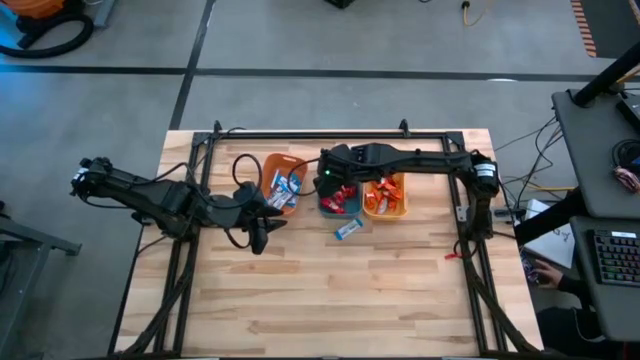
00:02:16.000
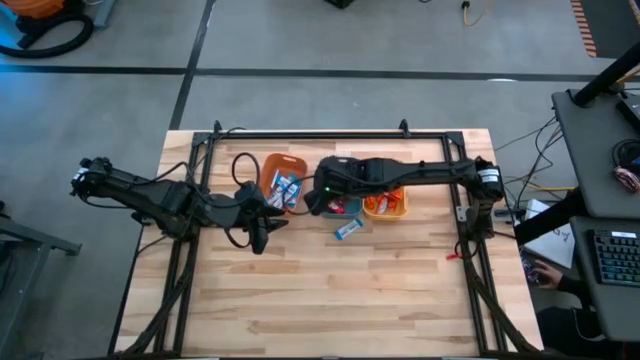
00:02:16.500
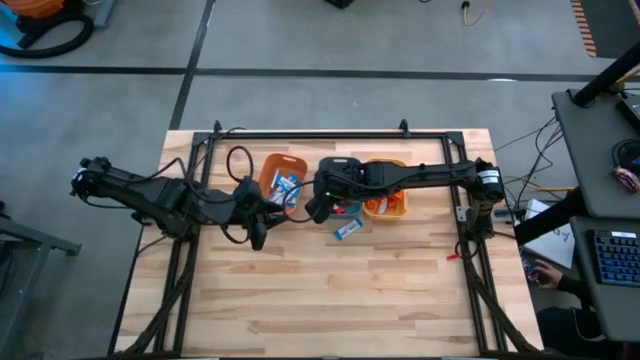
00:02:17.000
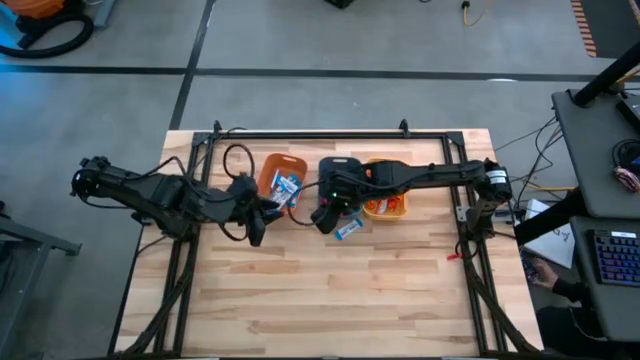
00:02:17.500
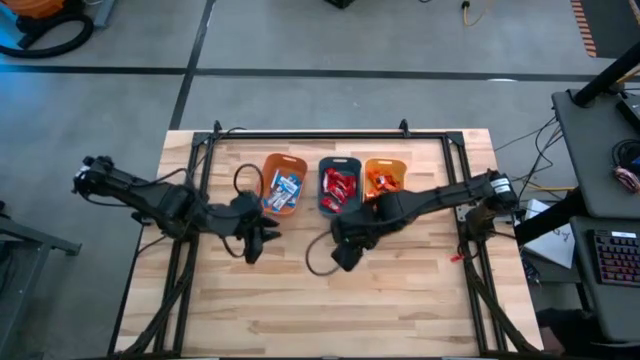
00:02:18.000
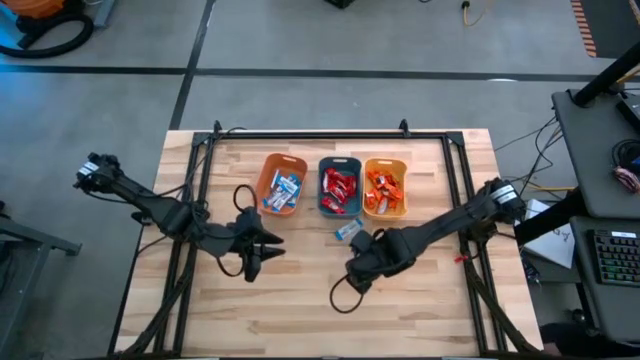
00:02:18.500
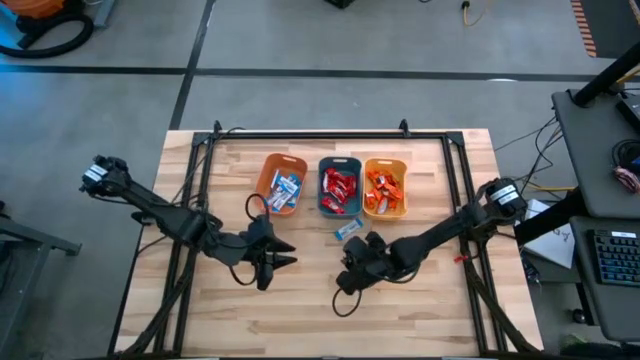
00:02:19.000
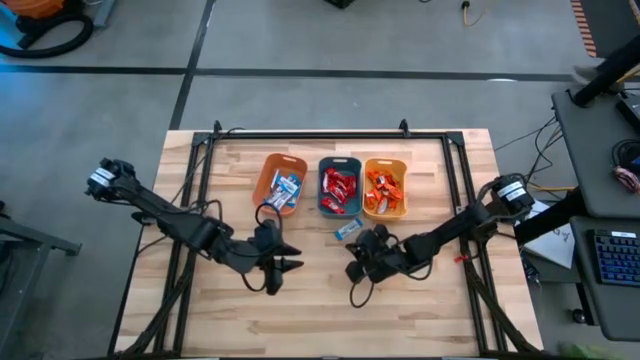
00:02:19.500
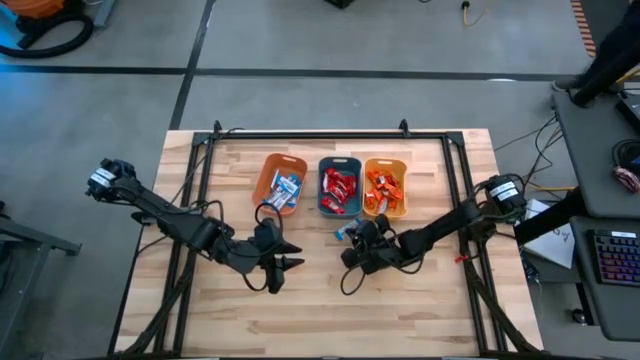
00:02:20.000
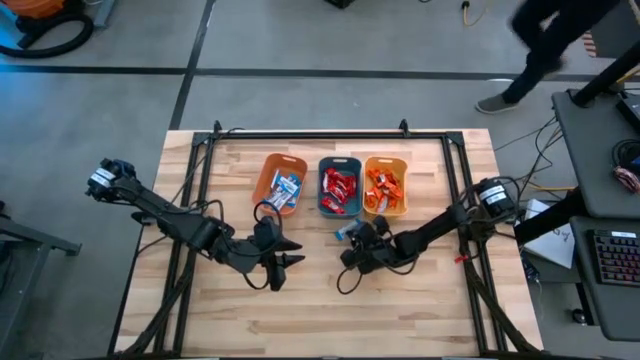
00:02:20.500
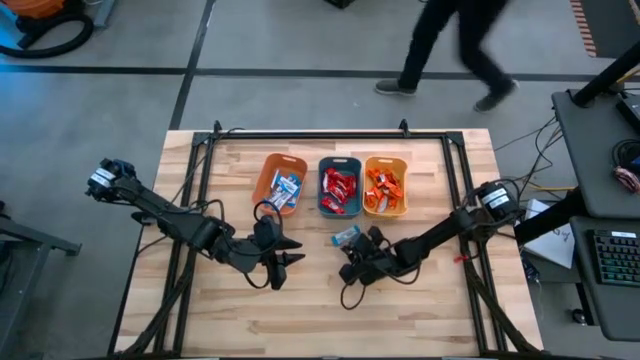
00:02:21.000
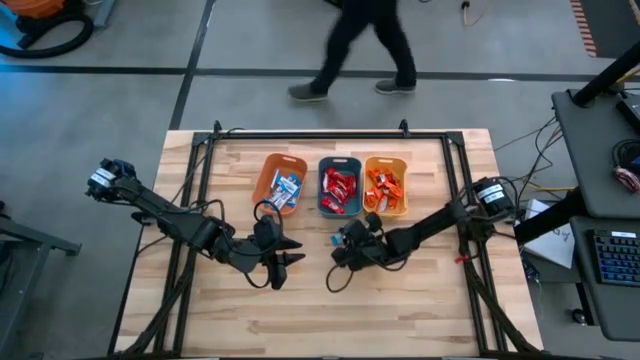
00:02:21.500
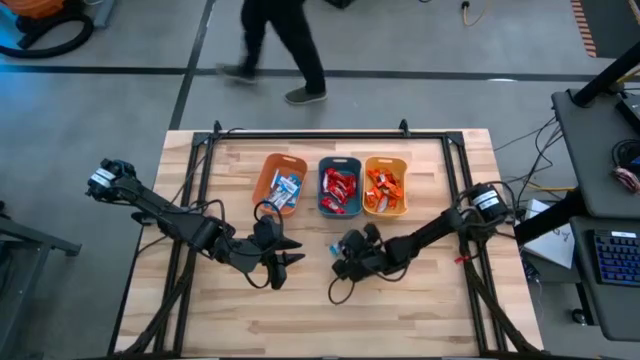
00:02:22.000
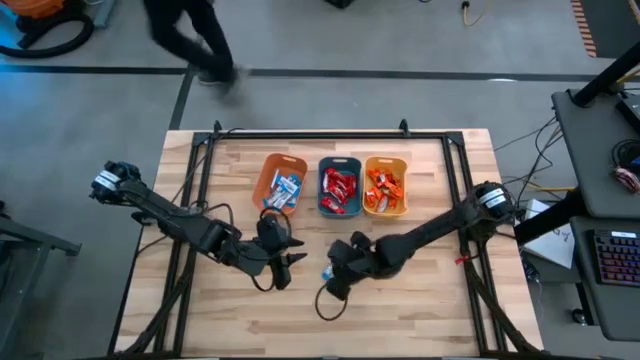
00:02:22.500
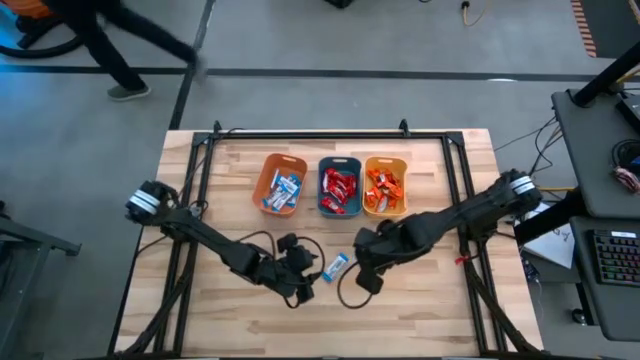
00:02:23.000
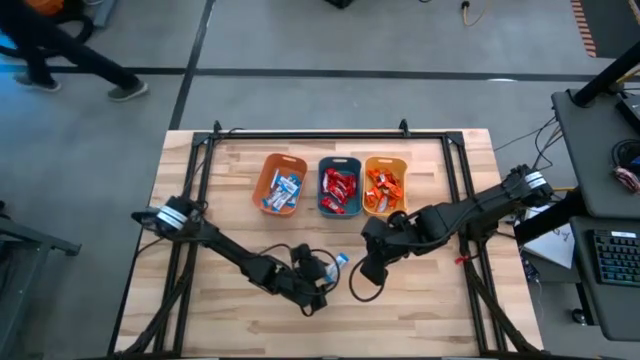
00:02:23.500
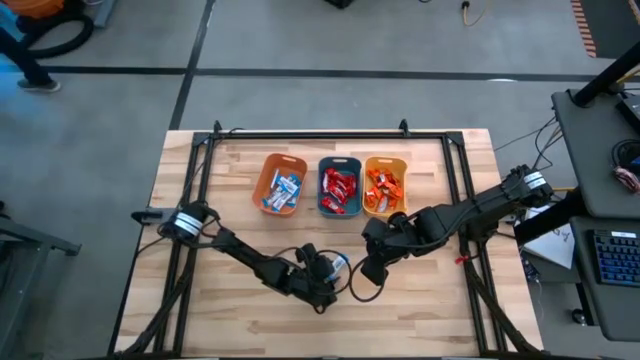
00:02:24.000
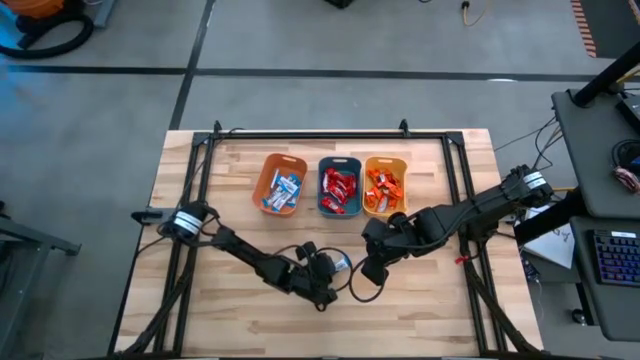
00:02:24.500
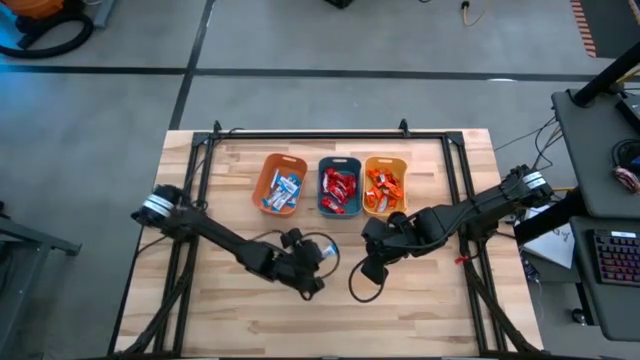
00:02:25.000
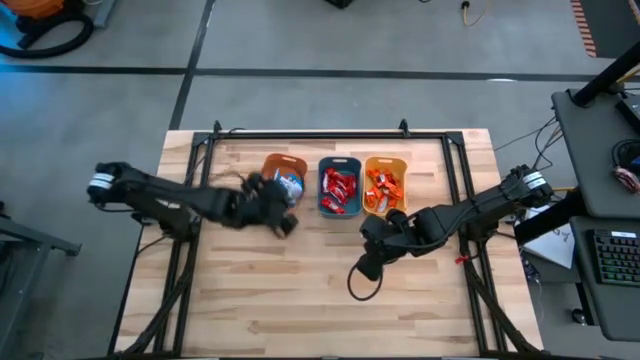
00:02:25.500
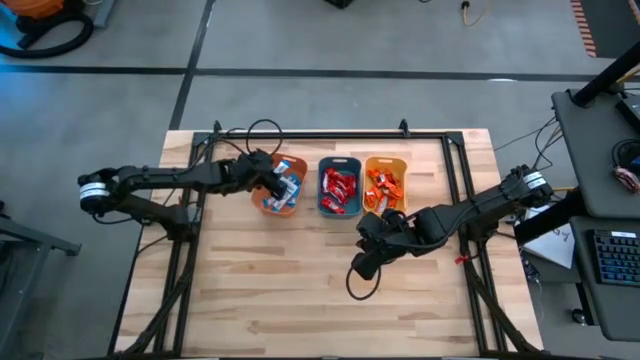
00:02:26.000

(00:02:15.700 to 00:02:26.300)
Task: Sort candy
Put the white chocolate bar into the orange bin

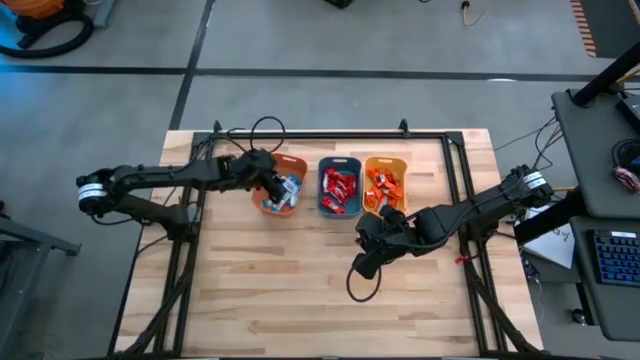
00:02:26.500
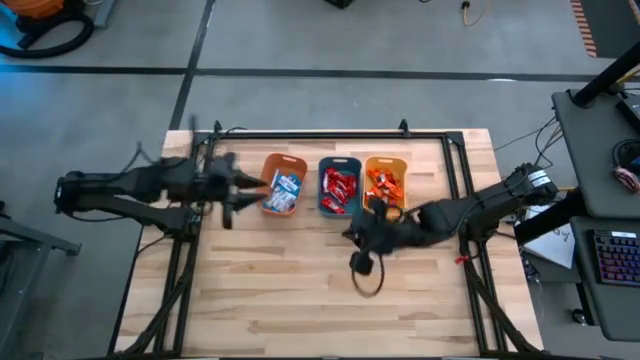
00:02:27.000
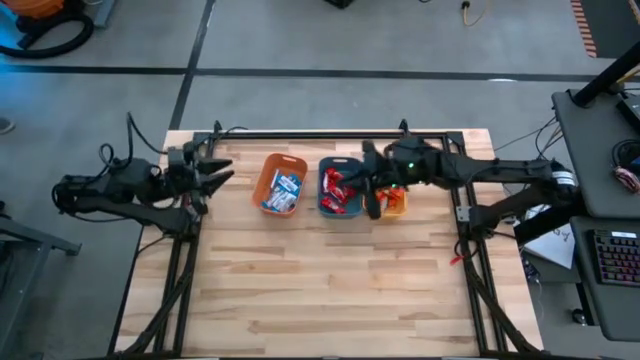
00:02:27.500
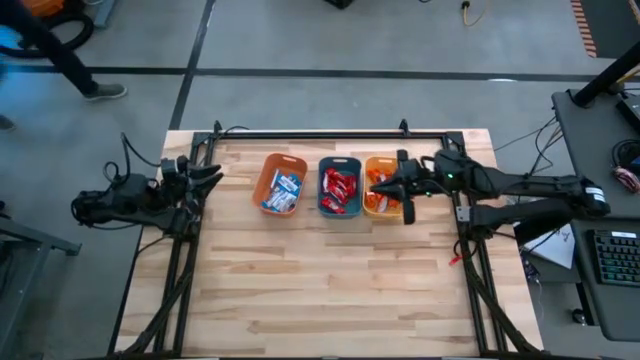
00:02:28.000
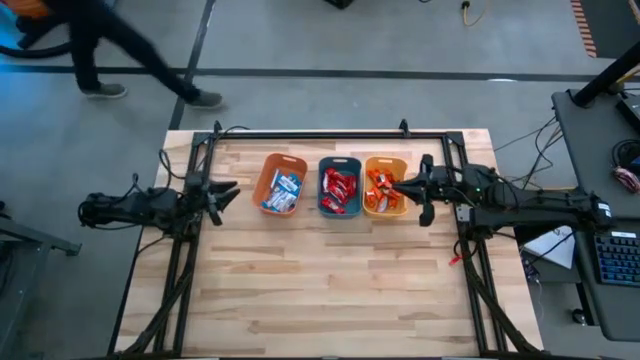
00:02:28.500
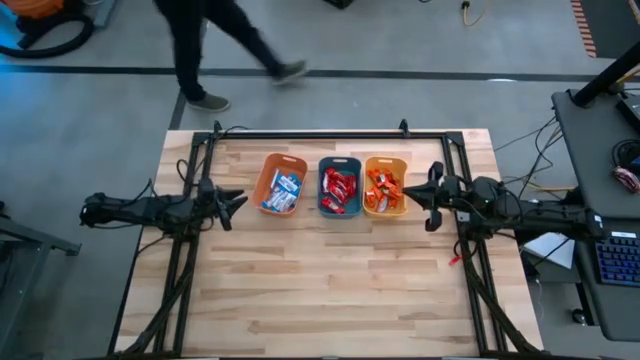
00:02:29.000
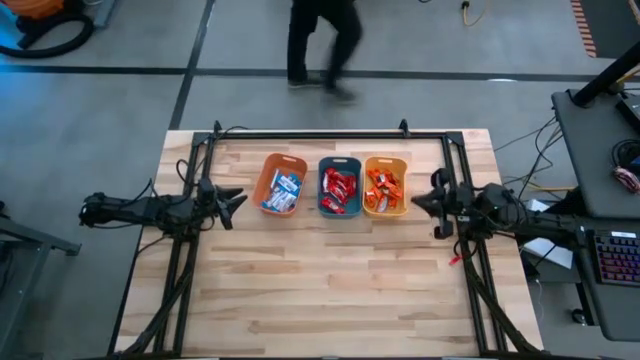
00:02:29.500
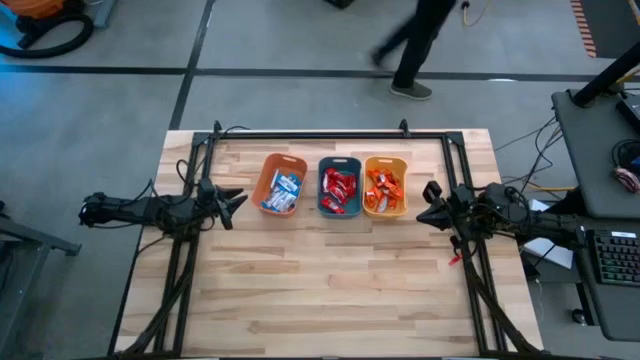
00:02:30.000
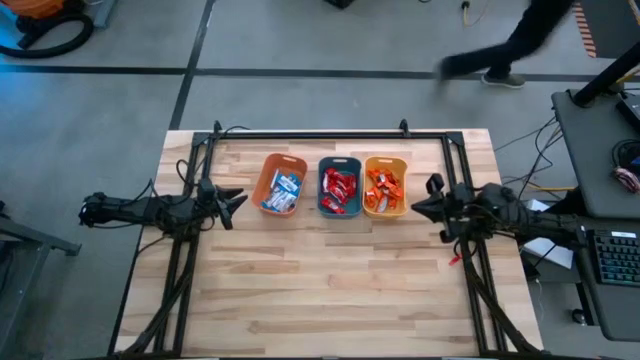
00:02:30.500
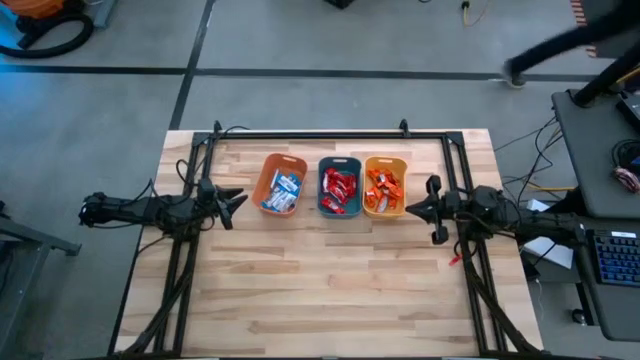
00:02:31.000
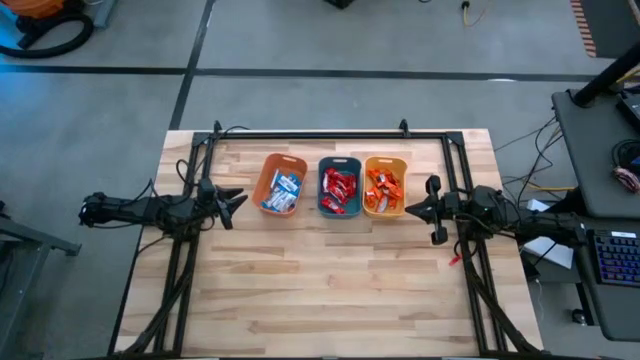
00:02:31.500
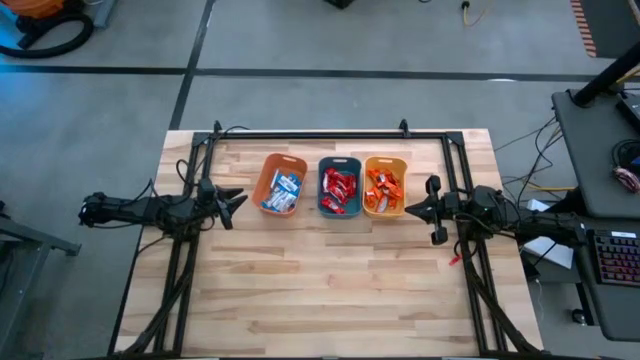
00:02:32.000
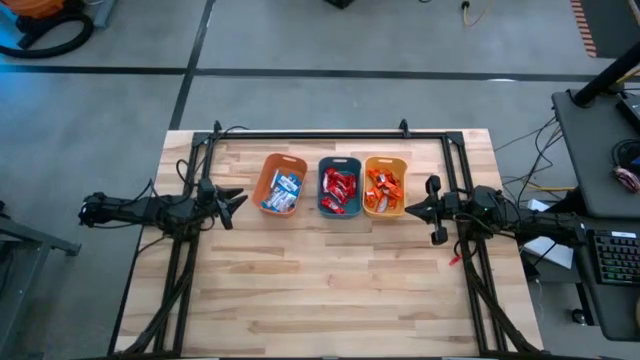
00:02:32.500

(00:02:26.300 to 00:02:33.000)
Return to Home Position

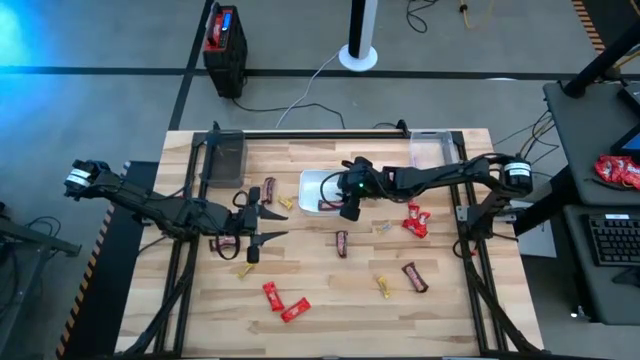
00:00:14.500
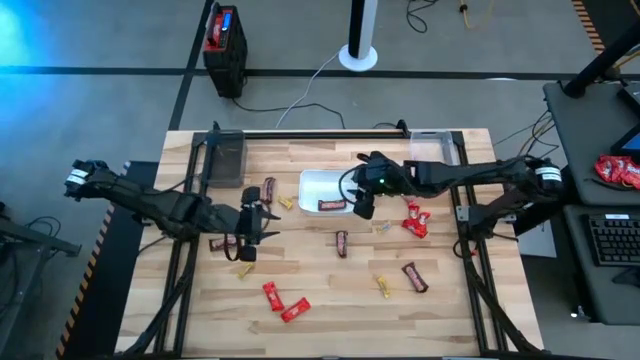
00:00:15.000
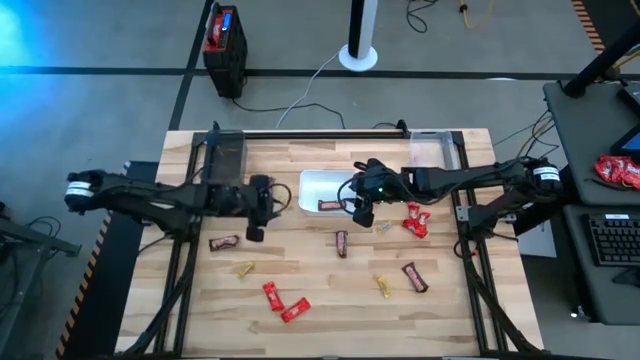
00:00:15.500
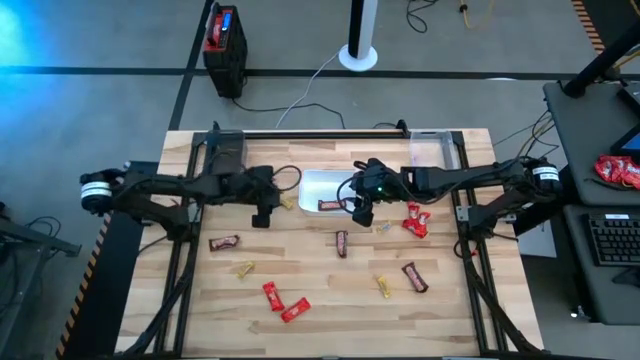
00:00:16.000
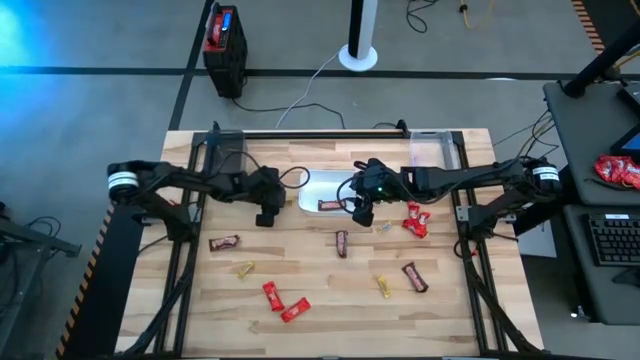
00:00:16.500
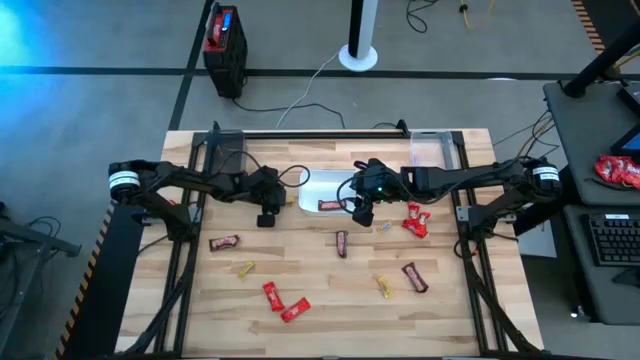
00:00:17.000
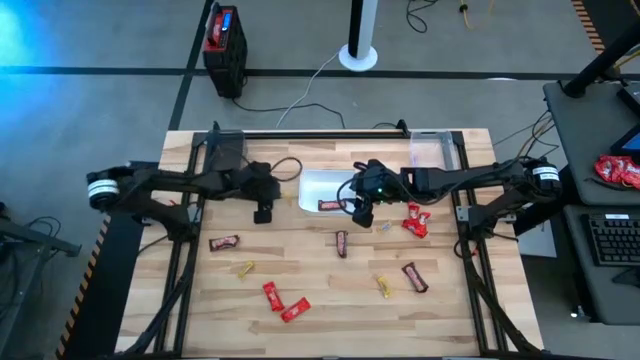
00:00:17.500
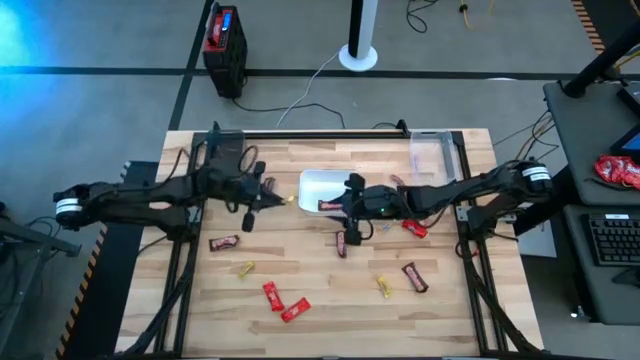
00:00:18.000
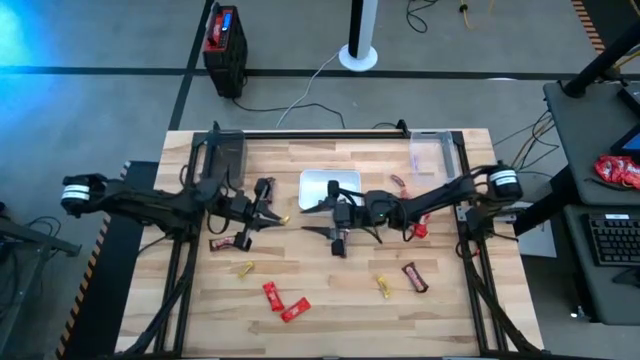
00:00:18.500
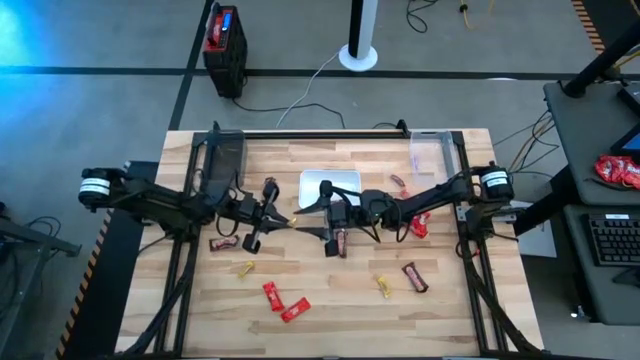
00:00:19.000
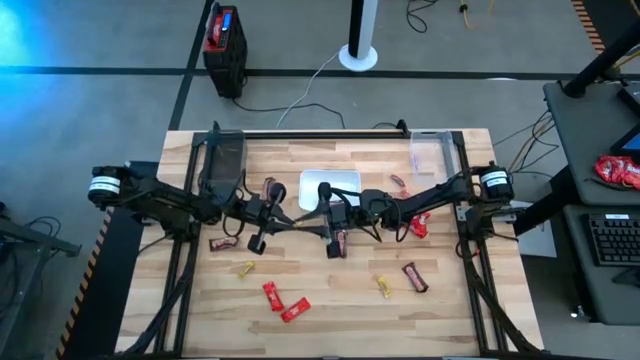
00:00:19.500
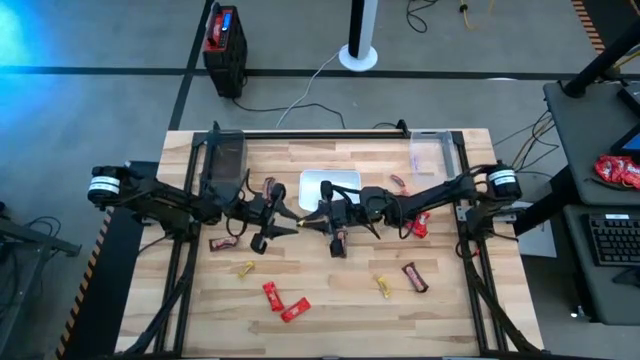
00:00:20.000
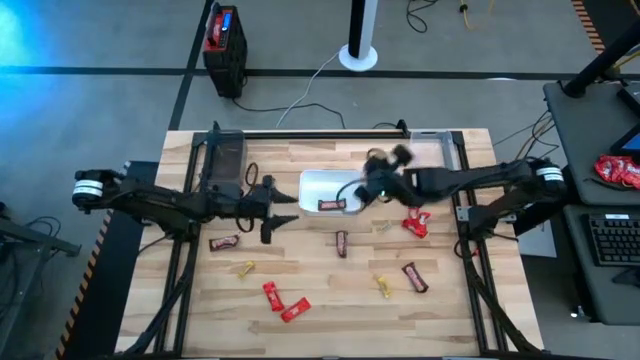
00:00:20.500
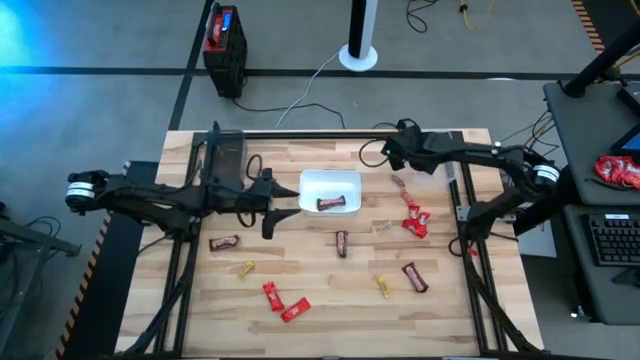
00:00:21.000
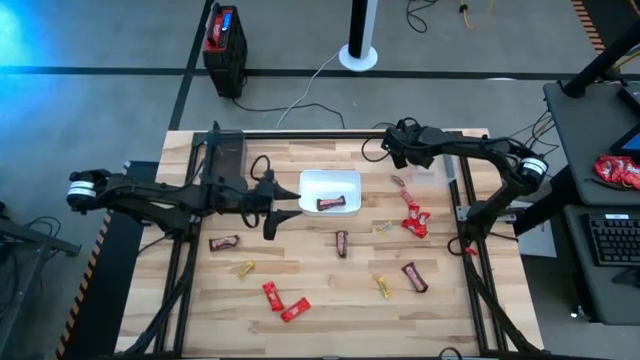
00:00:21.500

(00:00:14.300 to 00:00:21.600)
Task: Sort candy by brand, put in halloween buckets
Put the yellow candy into the transparent bin
